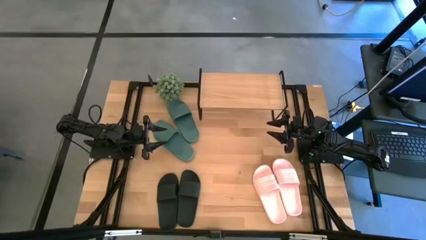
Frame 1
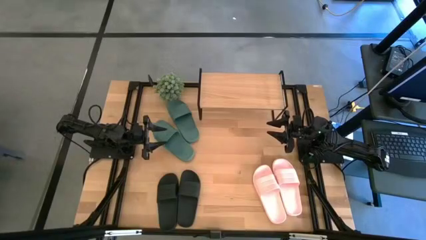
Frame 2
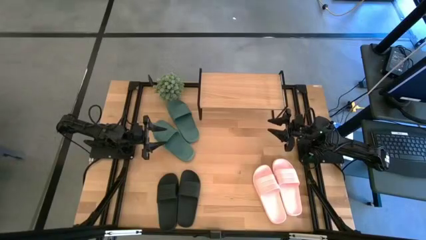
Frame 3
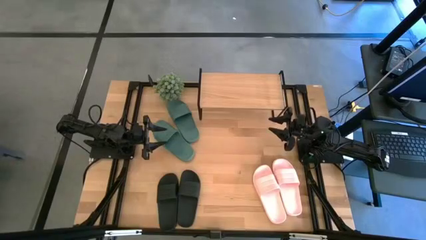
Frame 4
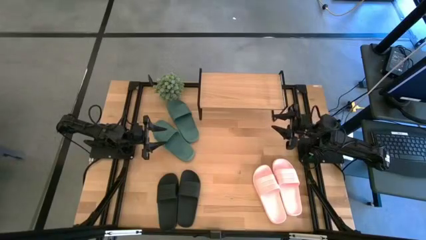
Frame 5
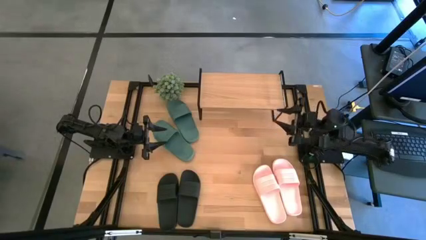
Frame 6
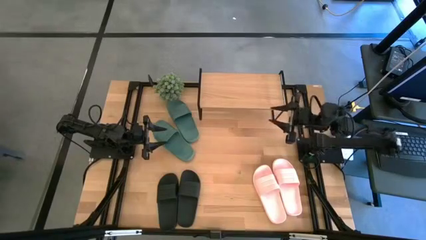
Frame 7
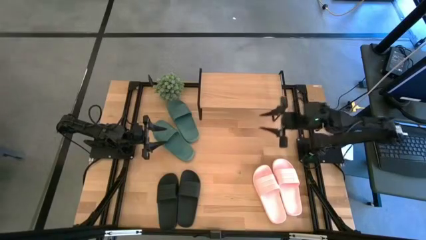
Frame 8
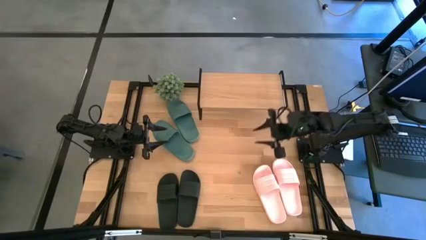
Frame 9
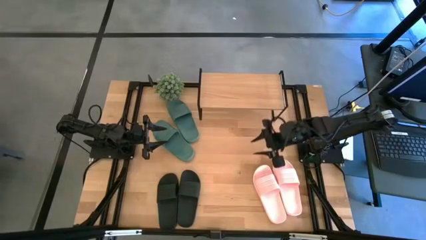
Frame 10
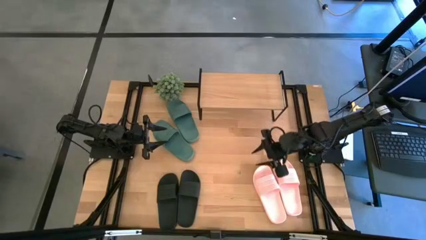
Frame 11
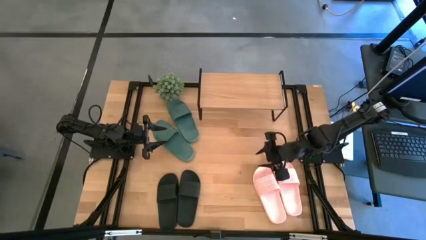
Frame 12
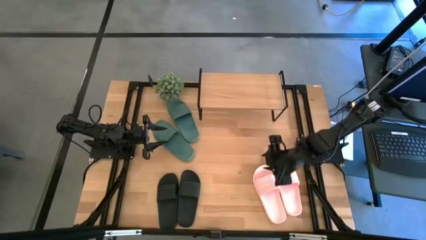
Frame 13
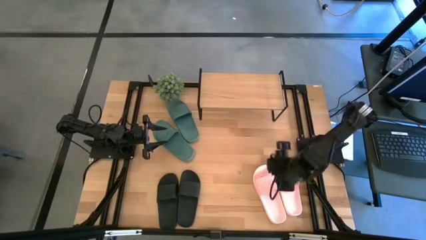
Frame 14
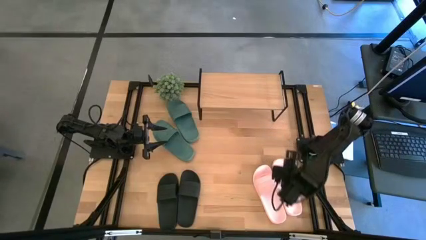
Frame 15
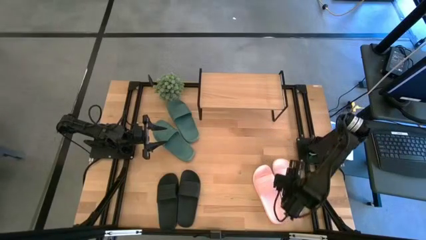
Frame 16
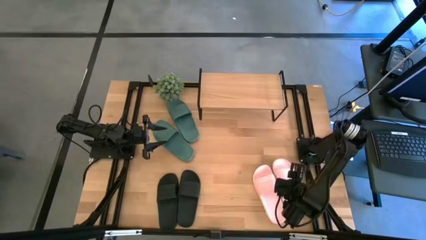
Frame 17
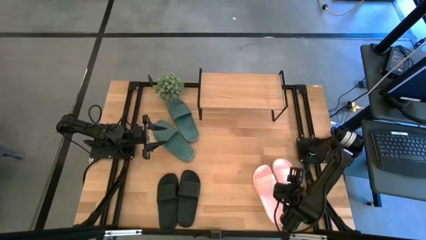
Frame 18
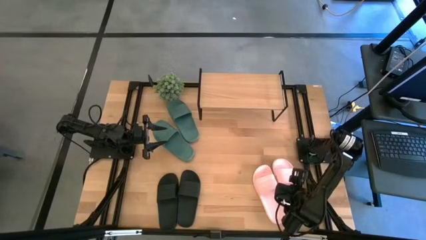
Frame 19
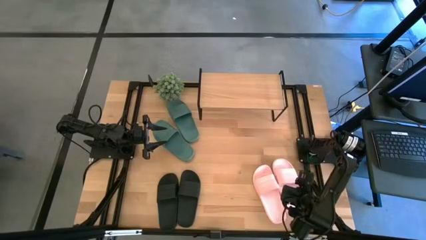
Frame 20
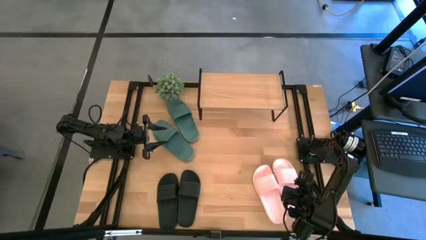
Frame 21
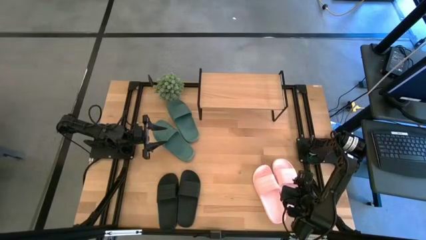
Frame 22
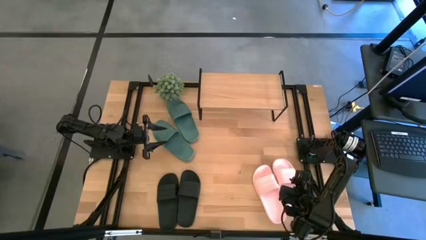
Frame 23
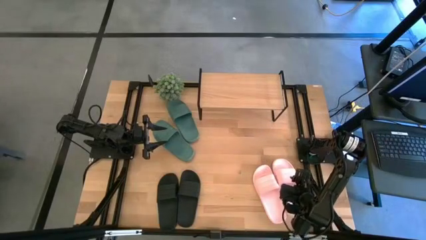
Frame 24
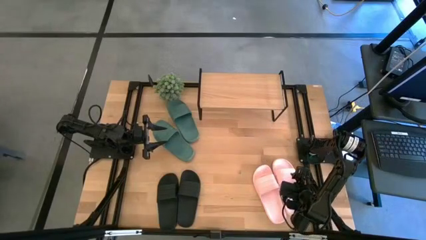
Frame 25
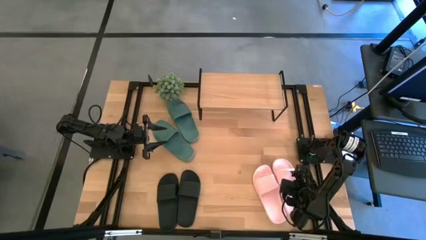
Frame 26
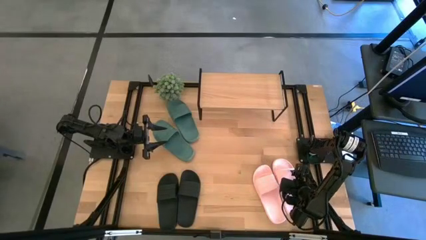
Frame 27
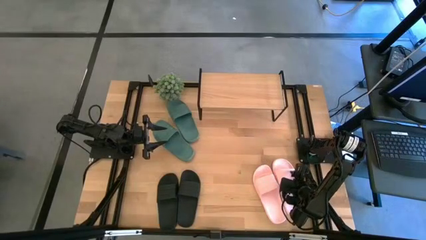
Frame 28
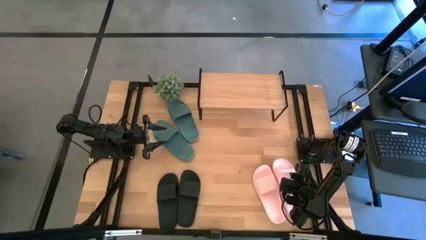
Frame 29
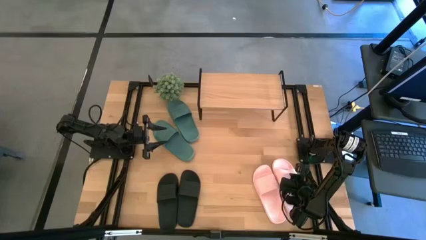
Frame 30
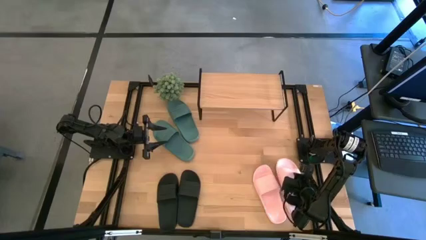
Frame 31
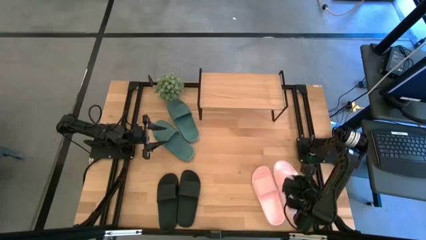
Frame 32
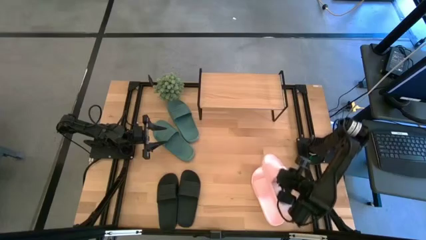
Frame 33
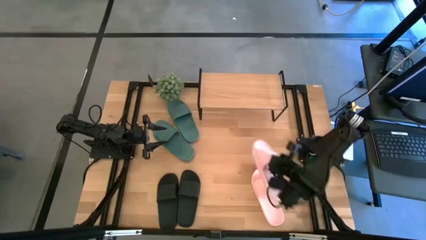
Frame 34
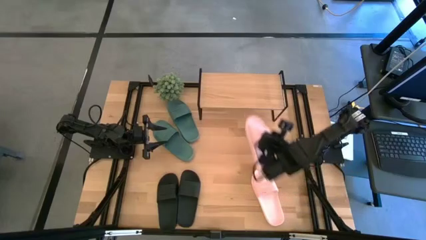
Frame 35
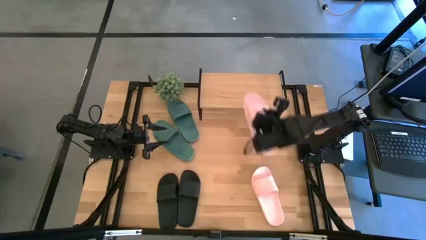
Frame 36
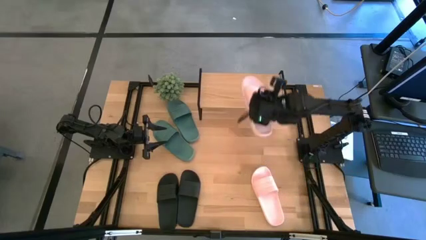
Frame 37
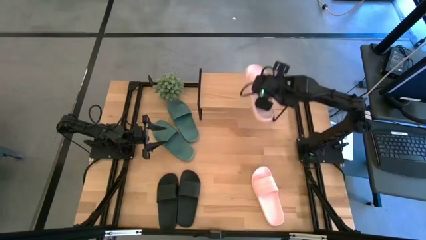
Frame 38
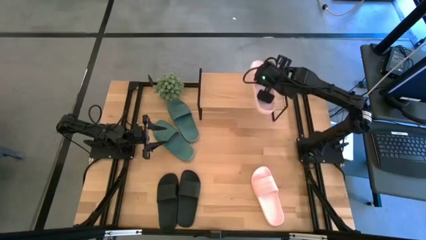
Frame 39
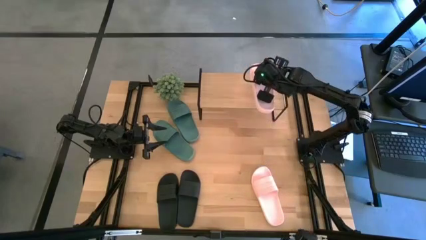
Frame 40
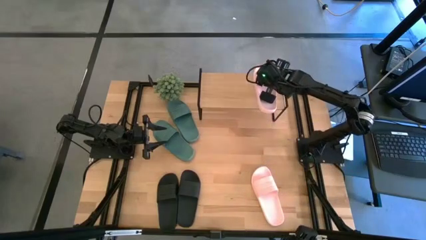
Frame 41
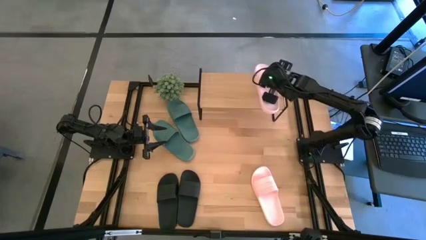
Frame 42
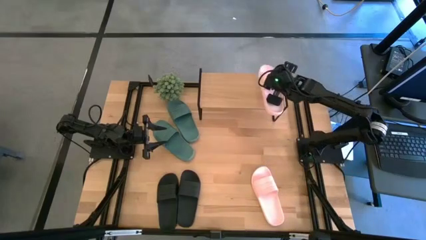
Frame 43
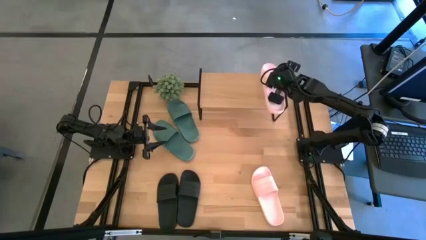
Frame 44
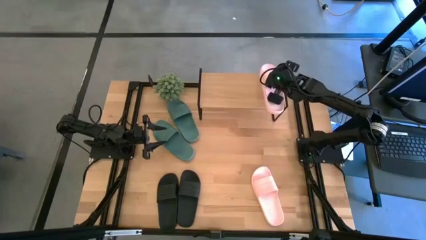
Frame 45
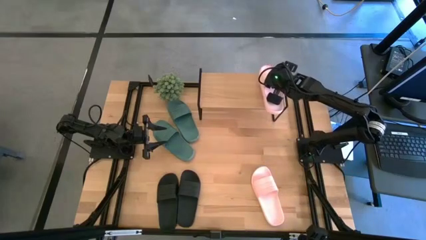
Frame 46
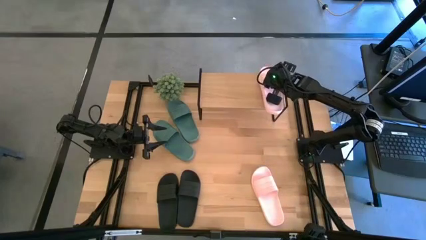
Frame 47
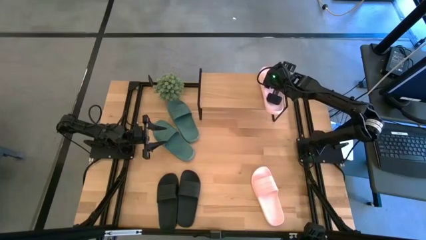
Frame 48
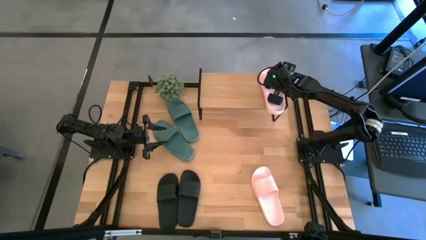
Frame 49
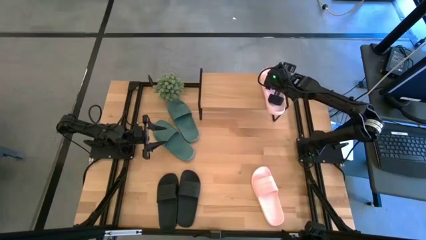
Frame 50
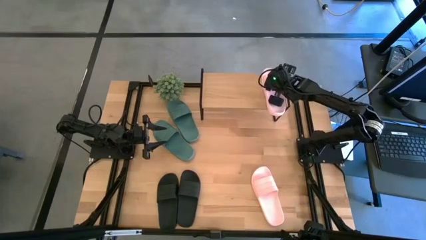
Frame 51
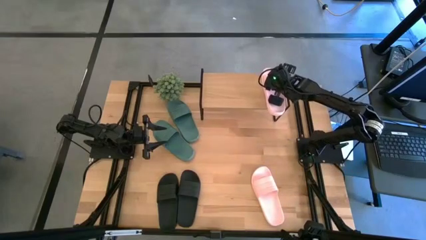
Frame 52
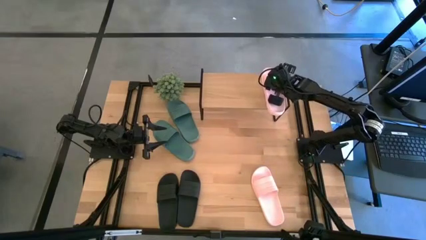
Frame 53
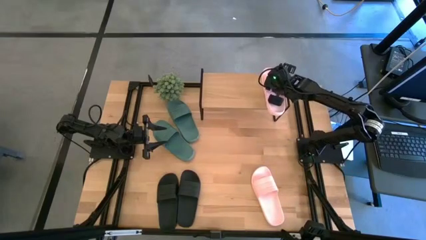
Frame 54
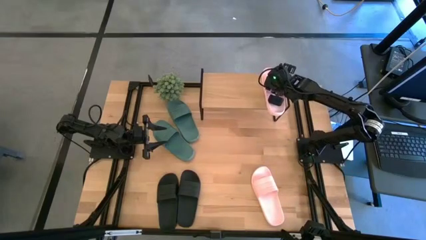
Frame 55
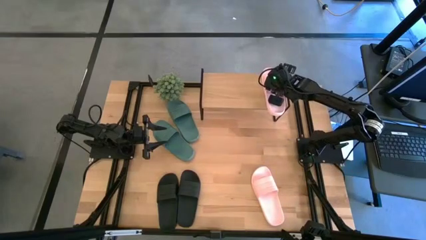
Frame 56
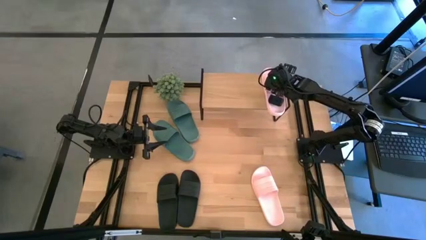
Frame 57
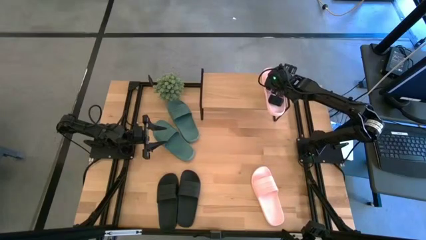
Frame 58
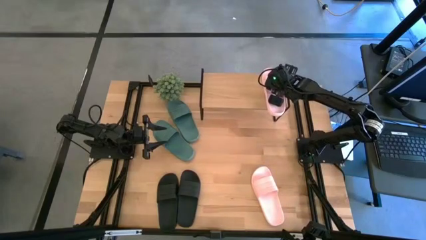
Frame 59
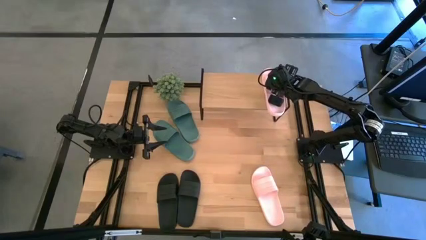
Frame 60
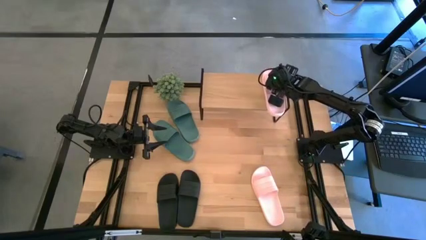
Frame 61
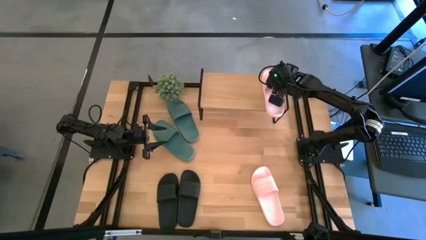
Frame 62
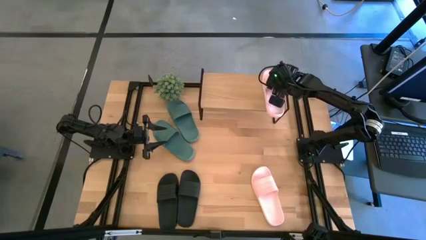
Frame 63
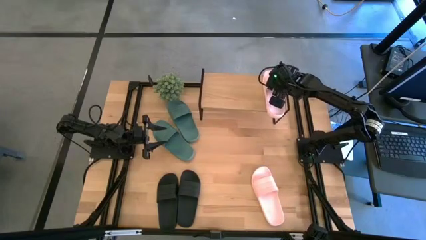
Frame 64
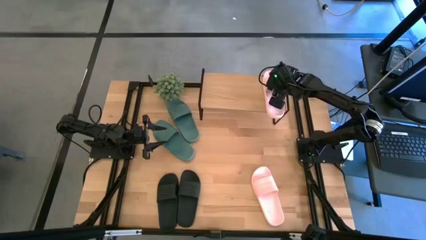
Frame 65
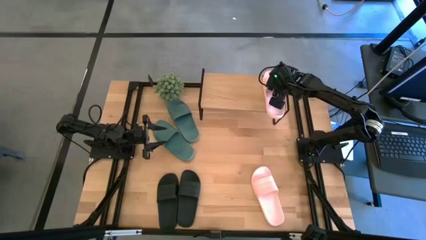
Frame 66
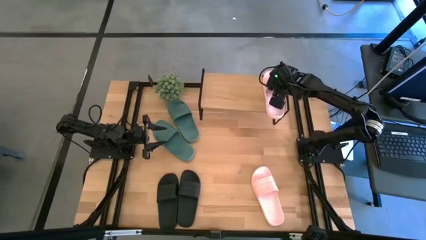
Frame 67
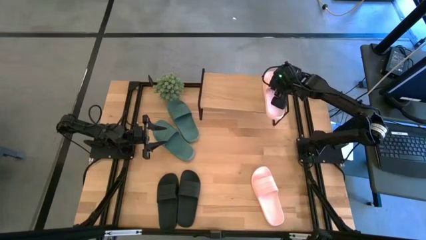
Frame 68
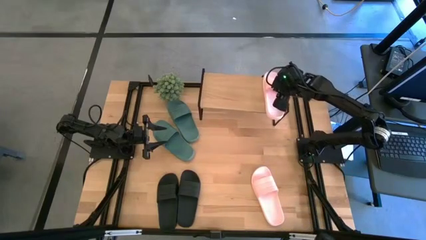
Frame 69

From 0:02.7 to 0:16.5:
Task: Pick and place slides into the shelf
Put the right pink slide on the shelf
